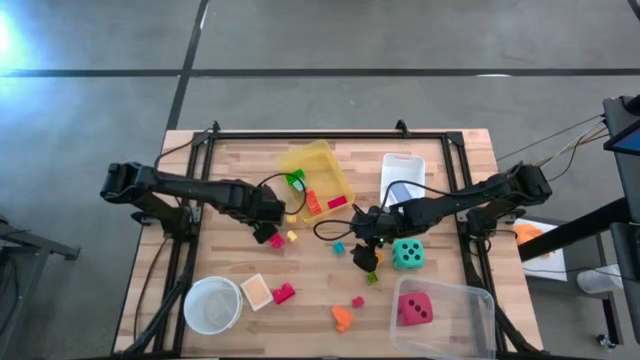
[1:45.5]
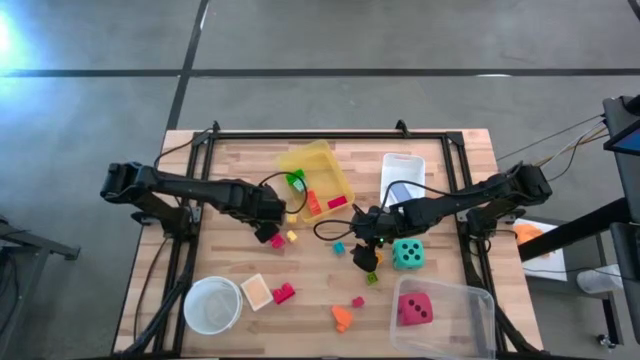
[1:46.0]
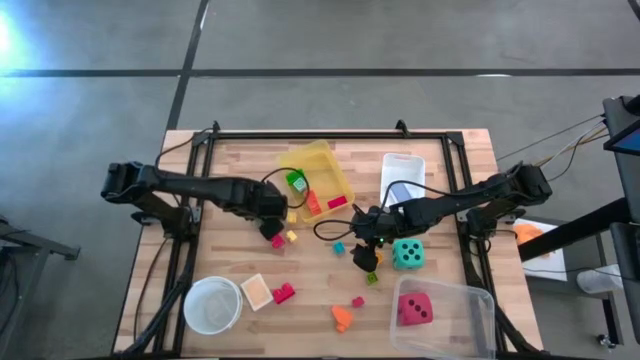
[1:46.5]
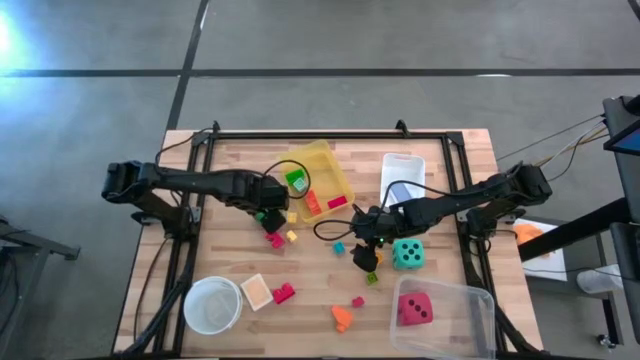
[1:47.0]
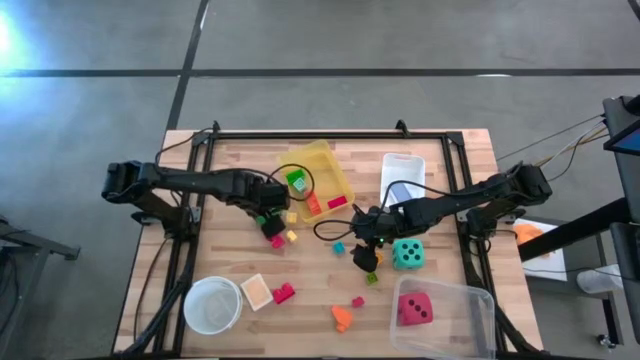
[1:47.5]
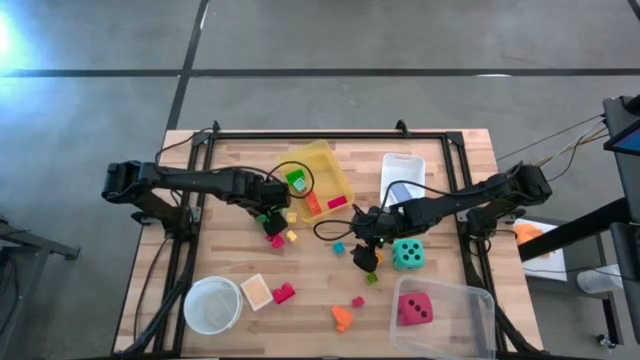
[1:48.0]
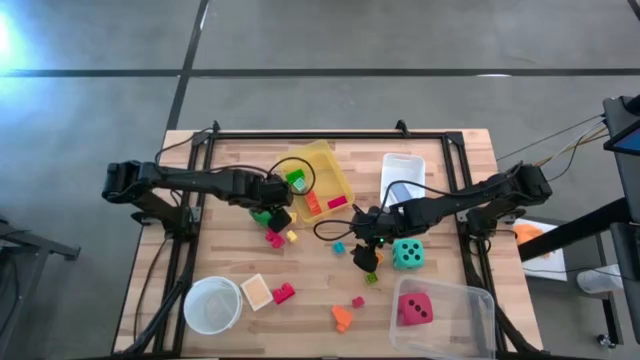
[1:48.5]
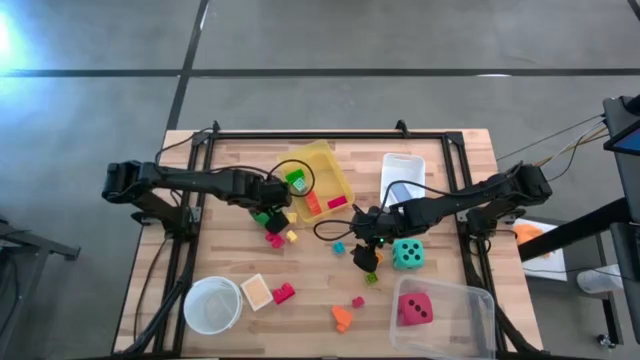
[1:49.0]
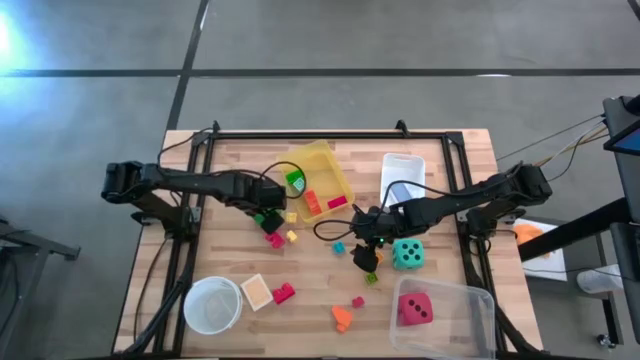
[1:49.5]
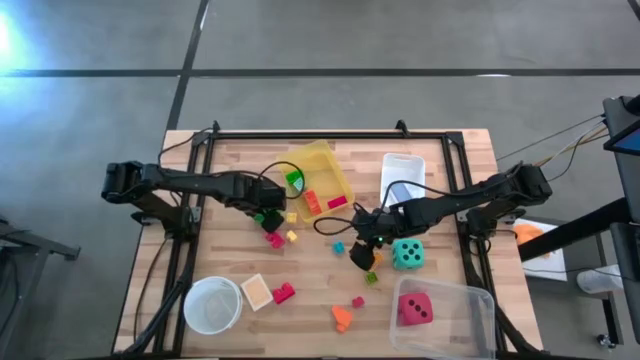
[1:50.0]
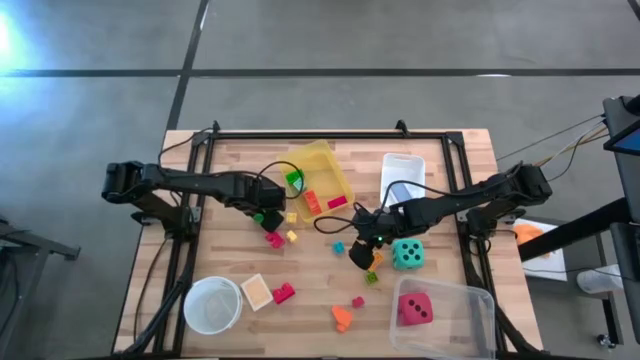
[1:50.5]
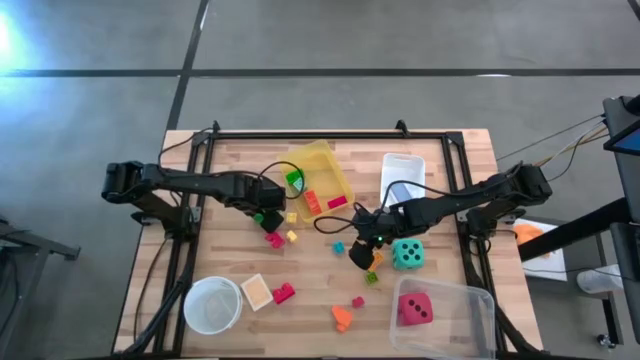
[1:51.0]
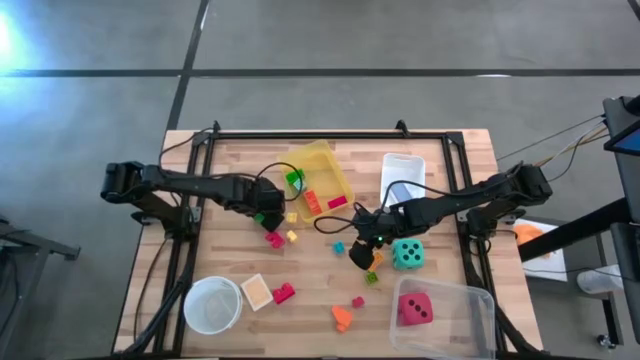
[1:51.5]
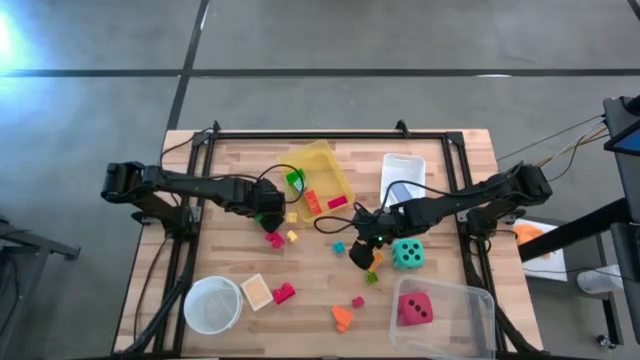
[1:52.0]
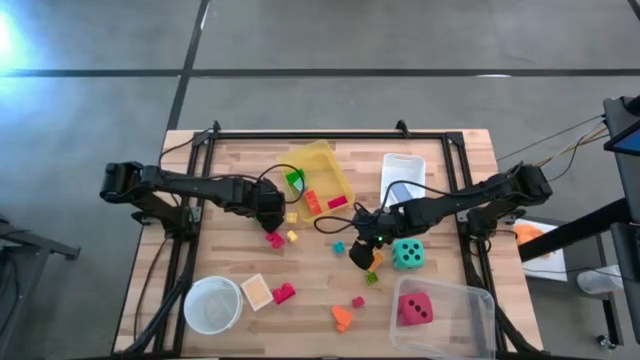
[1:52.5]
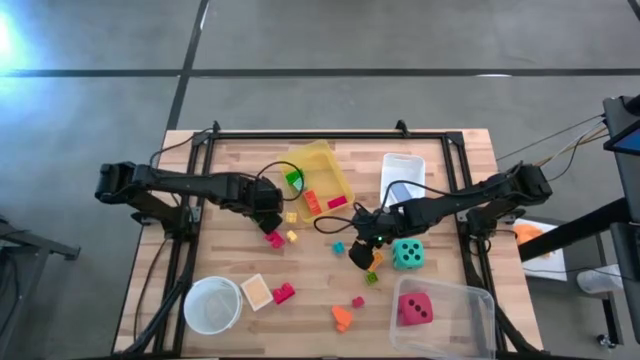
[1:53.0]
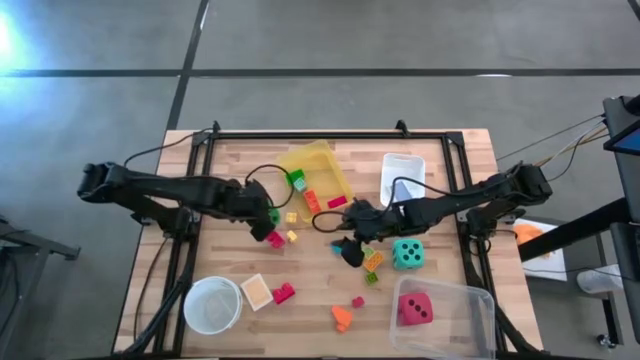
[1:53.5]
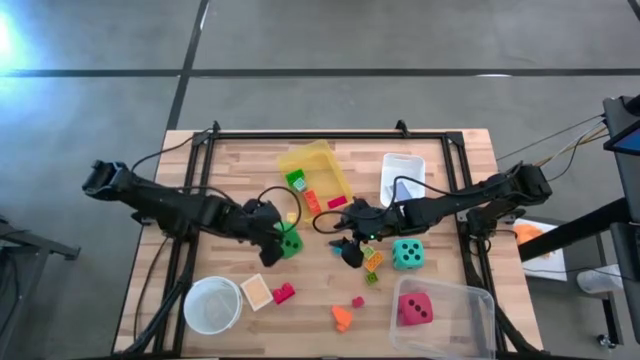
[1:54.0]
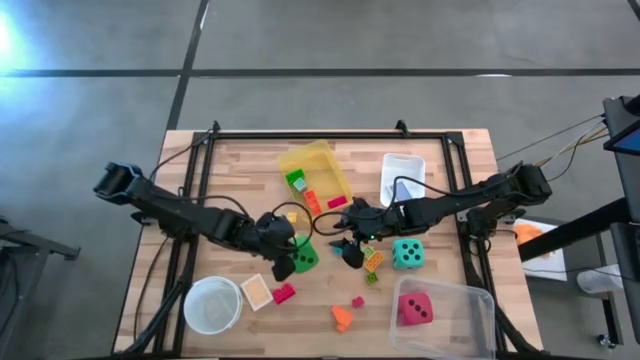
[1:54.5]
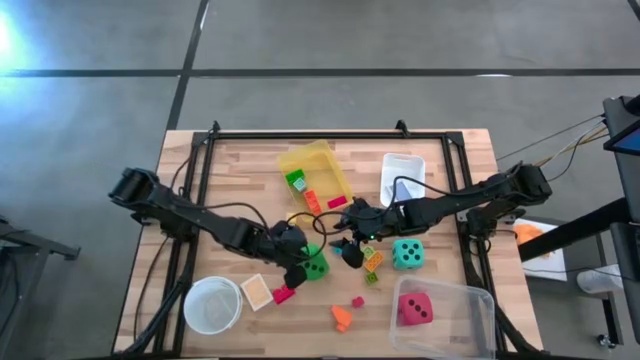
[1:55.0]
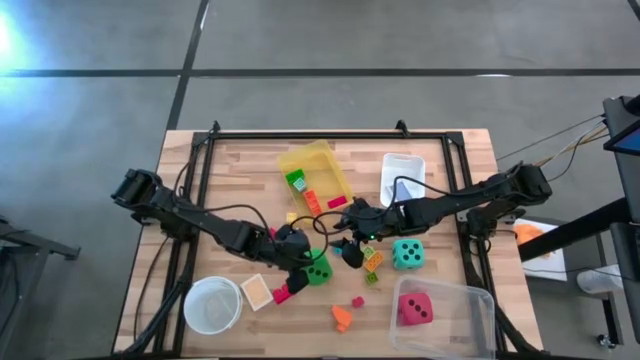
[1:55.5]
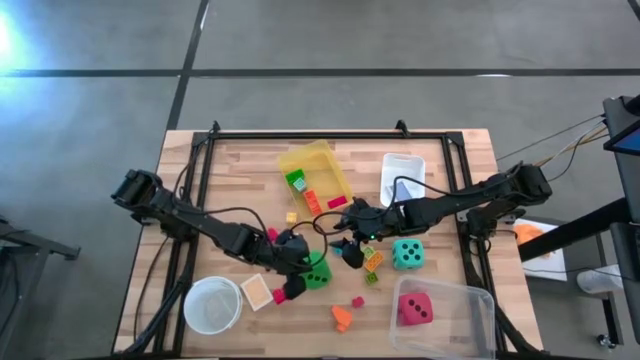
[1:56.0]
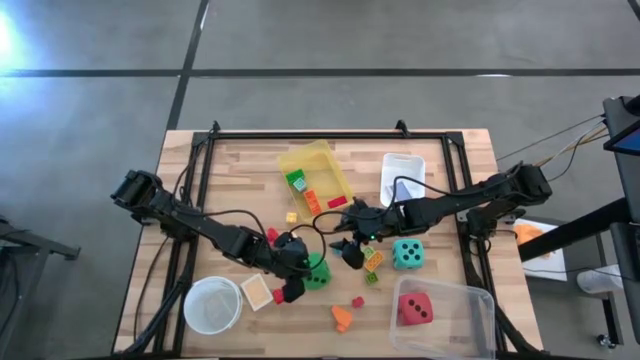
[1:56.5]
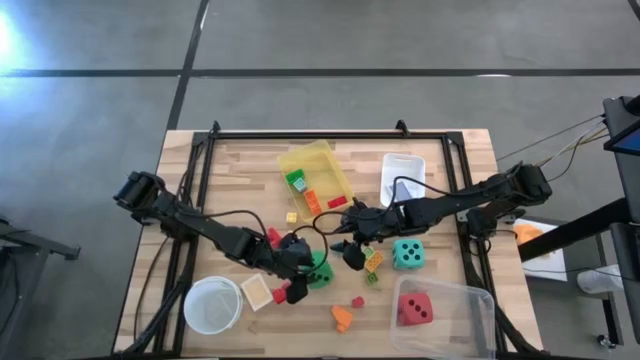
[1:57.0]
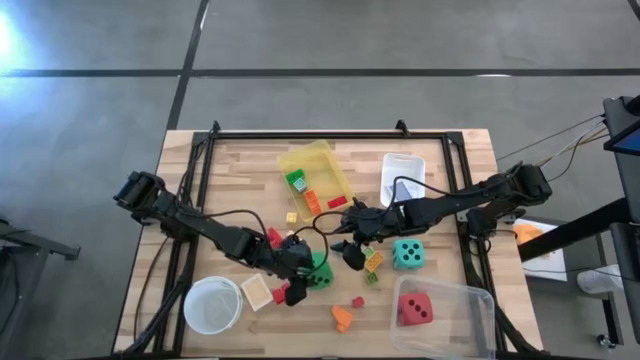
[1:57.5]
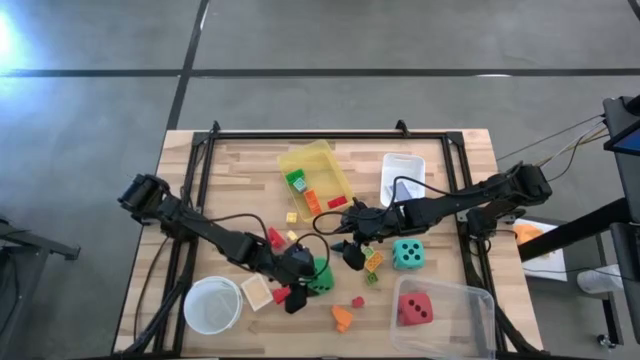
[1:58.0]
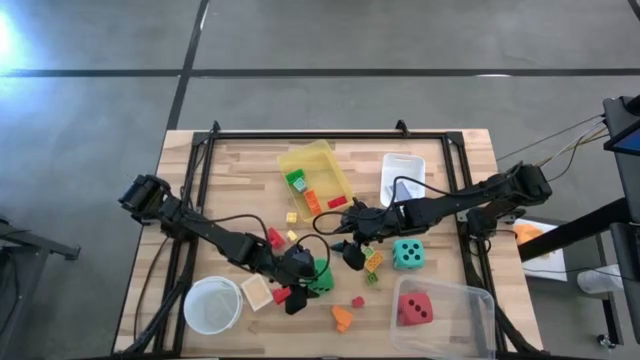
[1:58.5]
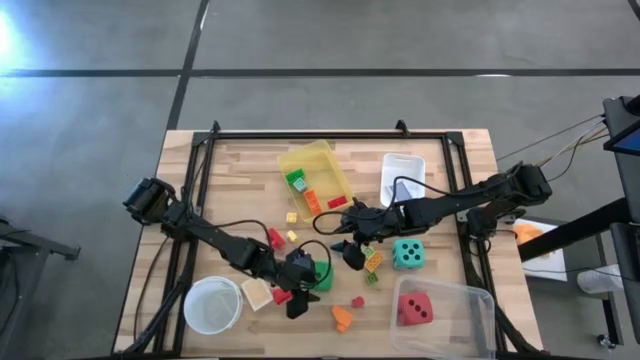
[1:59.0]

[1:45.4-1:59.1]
Task: Pick & Place Toys
Put the green dice into the transparent bin

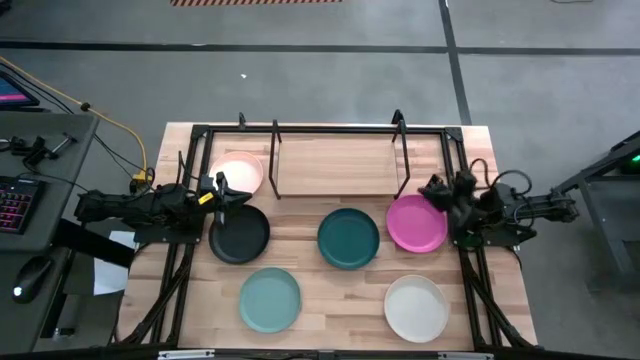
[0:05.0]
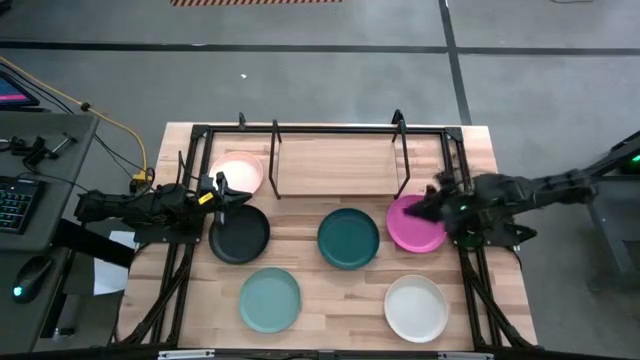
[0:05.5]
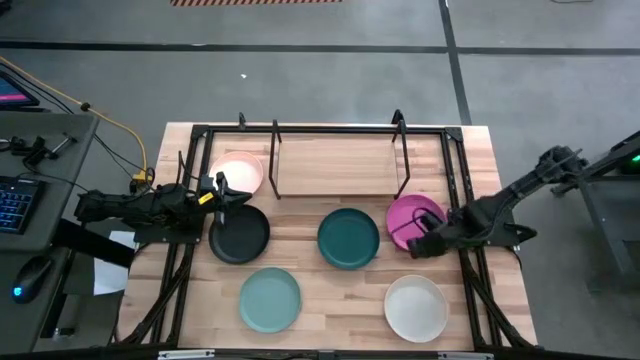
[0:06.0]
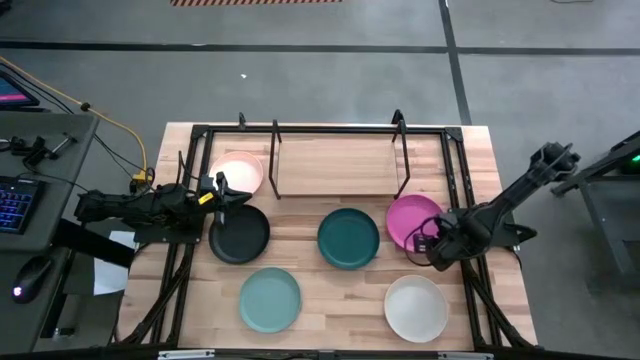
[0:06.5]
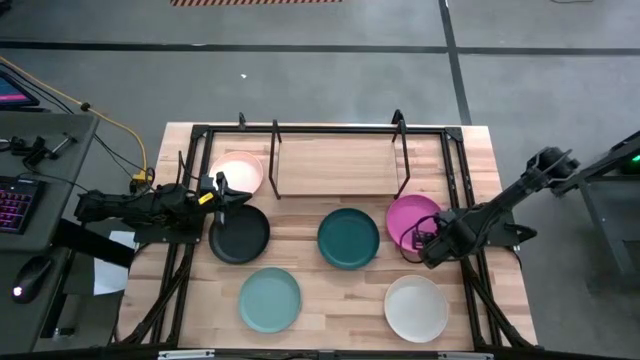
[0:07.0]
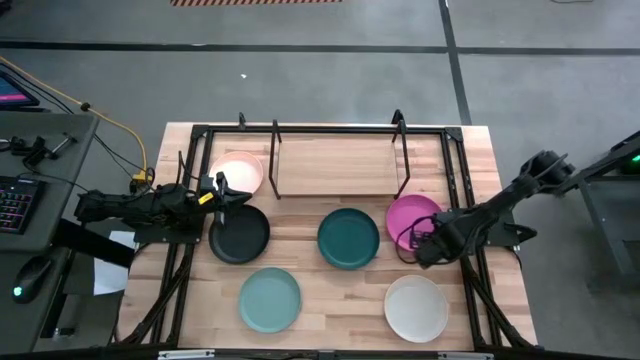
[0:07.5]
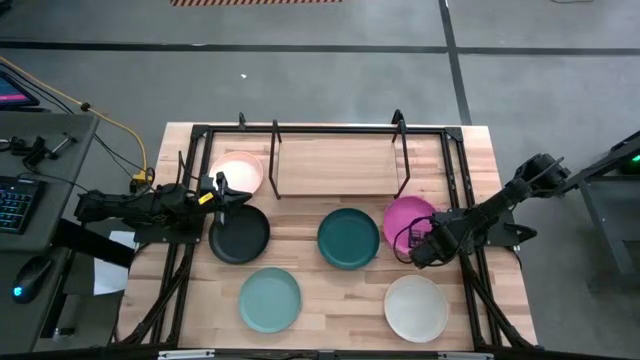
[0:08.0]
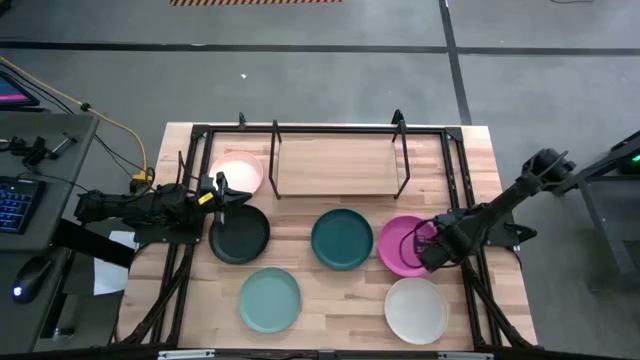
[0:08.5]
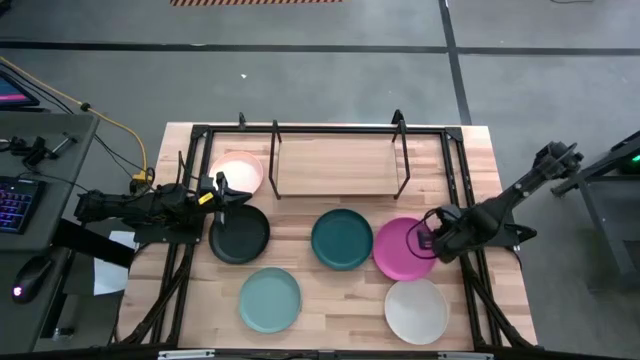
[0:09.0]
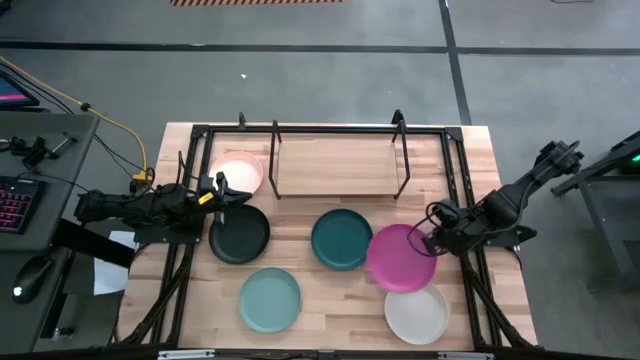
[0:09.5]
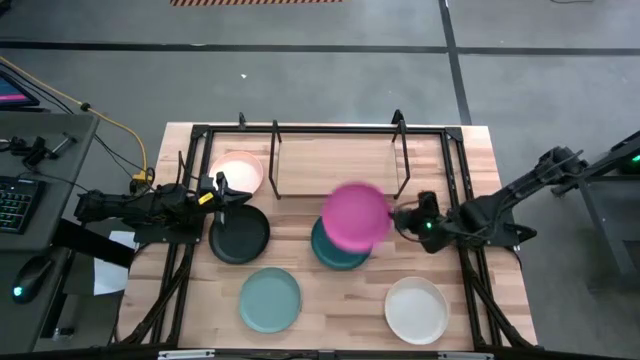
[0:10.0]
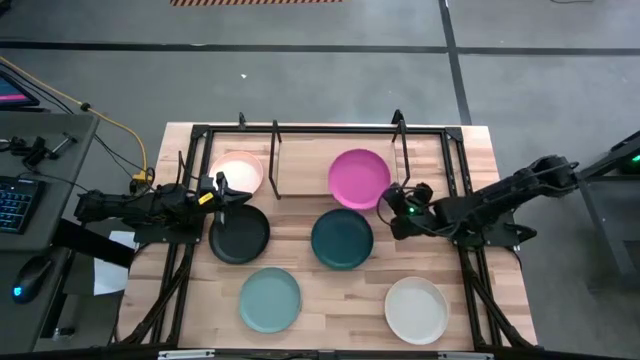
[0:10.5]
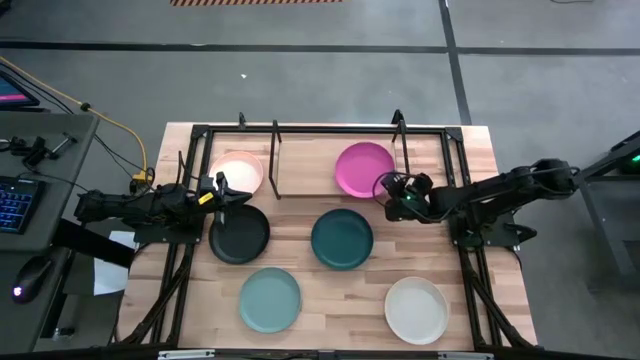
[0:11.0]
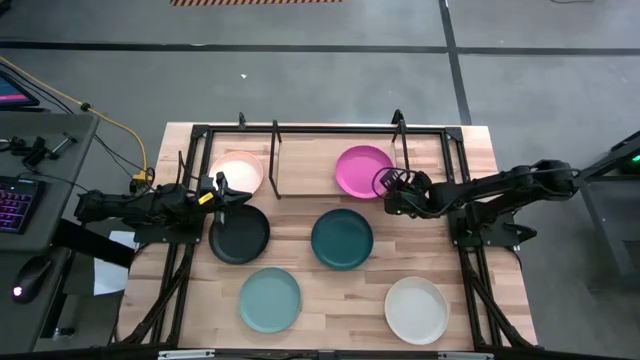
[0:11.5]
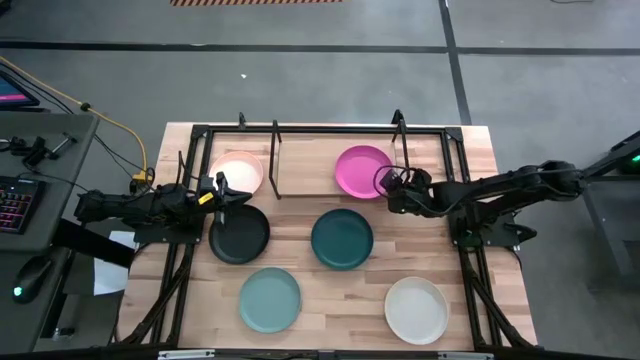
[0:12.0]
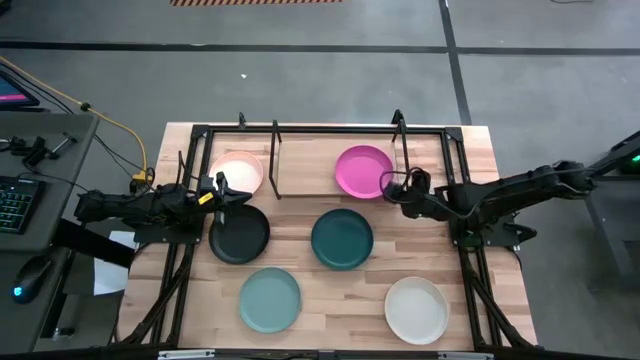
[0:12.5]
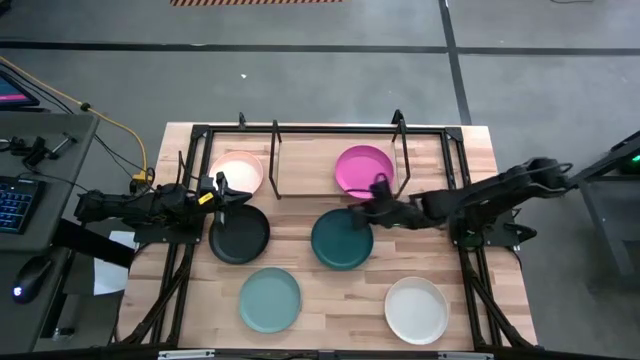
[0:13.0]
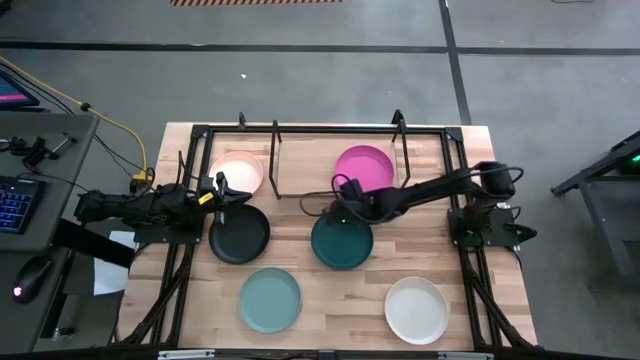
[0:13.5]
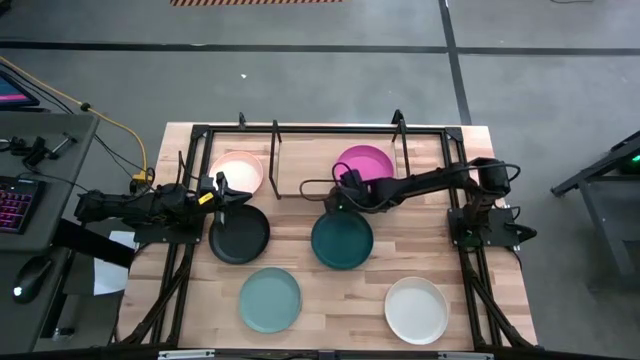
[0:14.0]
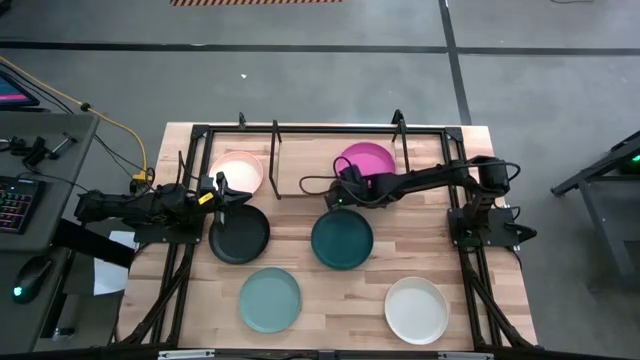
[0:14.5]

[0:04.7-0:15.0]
Task: Place and stack plates onto a shelf
Put the pink plate on the shelf
